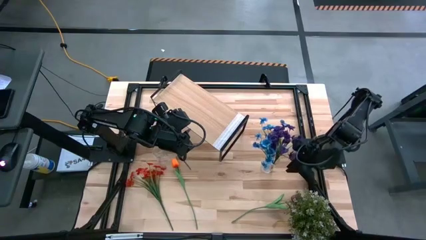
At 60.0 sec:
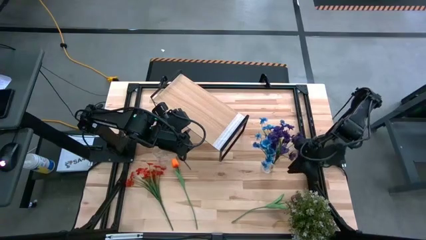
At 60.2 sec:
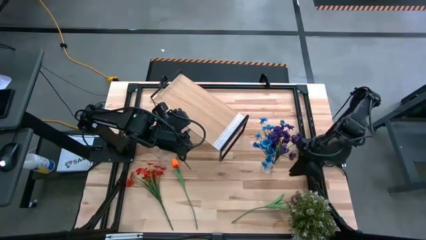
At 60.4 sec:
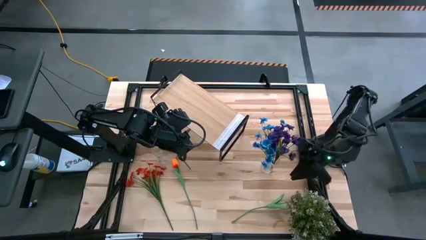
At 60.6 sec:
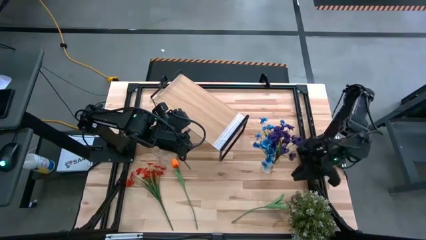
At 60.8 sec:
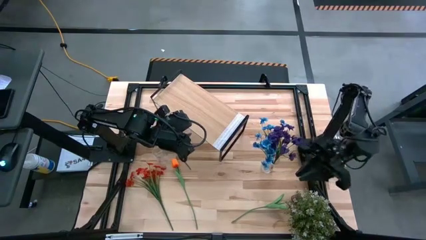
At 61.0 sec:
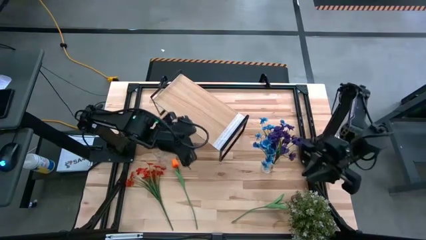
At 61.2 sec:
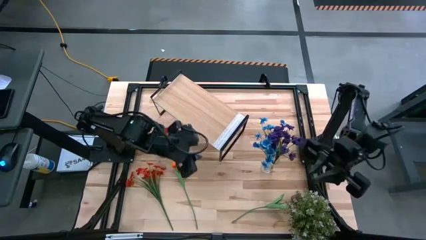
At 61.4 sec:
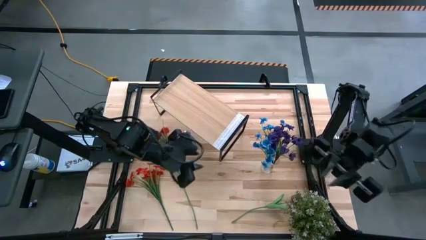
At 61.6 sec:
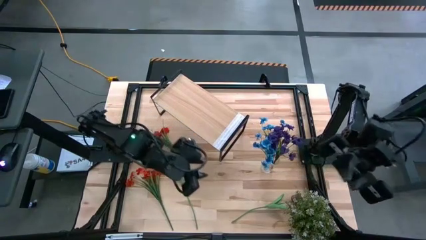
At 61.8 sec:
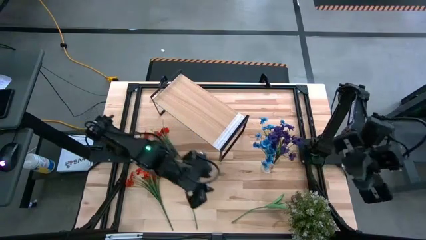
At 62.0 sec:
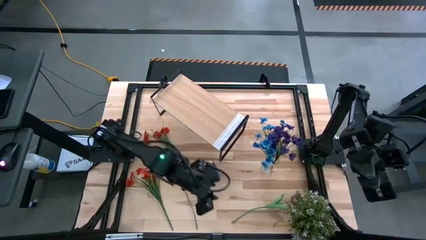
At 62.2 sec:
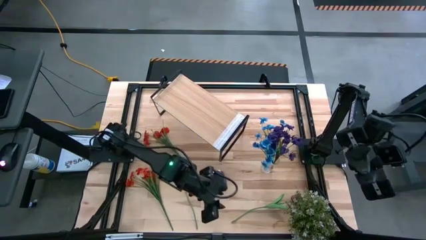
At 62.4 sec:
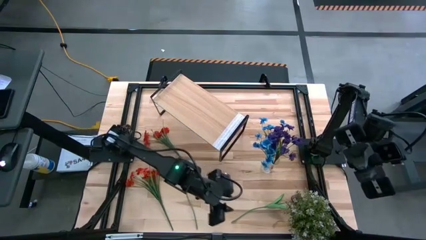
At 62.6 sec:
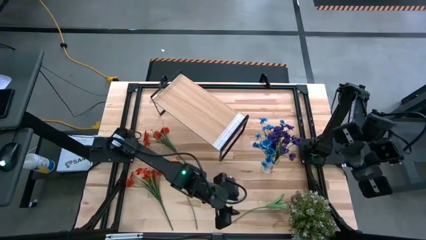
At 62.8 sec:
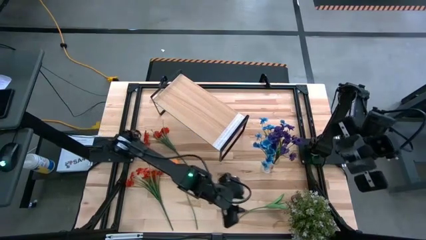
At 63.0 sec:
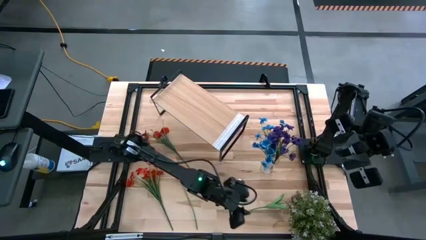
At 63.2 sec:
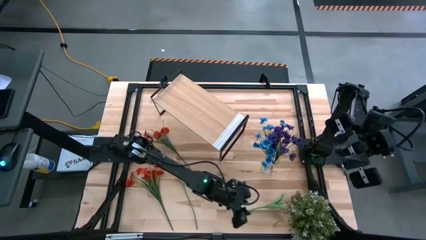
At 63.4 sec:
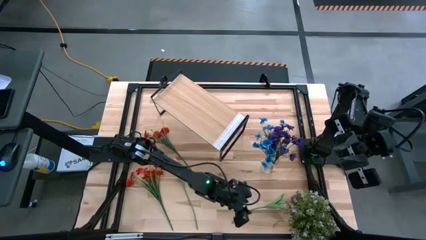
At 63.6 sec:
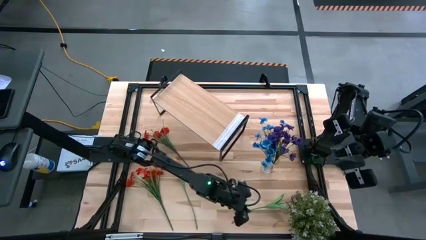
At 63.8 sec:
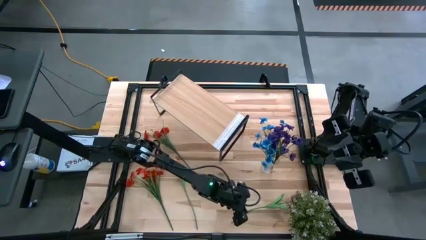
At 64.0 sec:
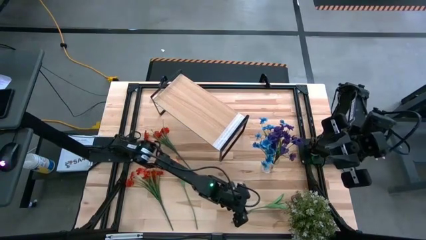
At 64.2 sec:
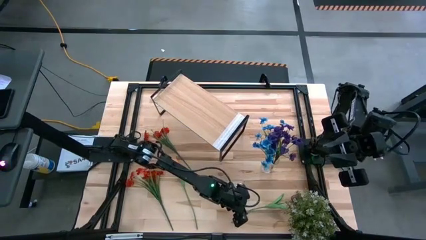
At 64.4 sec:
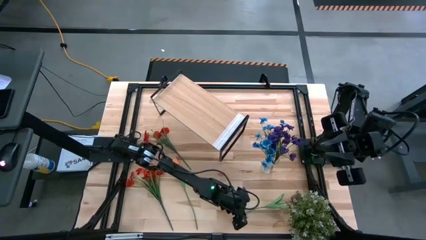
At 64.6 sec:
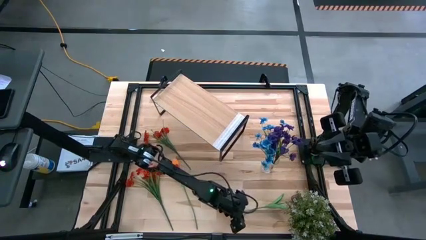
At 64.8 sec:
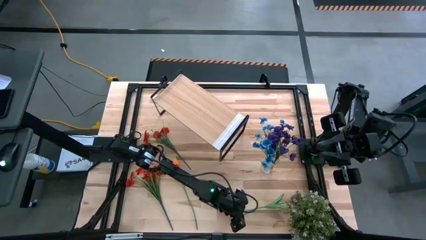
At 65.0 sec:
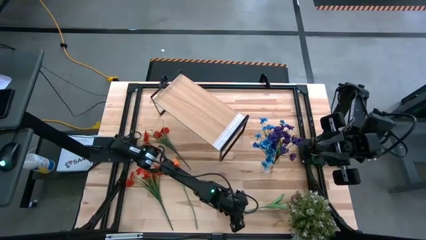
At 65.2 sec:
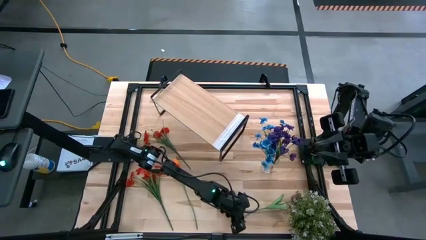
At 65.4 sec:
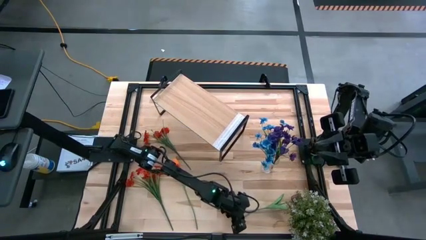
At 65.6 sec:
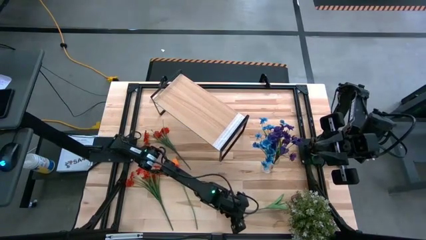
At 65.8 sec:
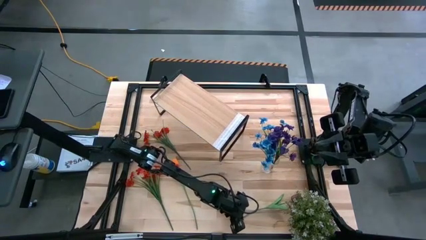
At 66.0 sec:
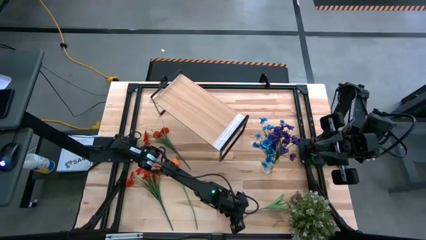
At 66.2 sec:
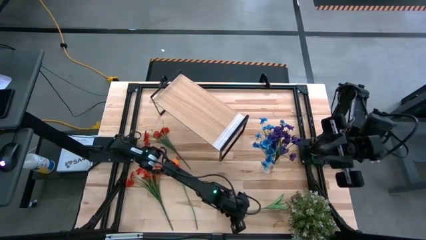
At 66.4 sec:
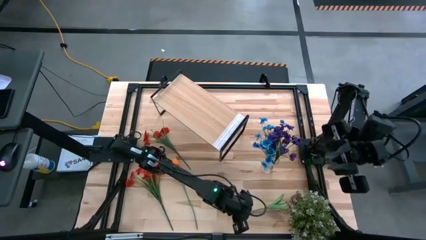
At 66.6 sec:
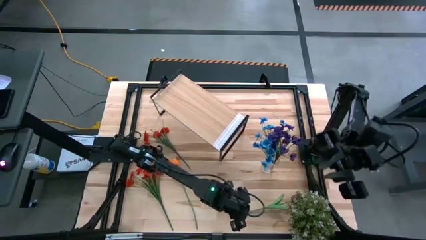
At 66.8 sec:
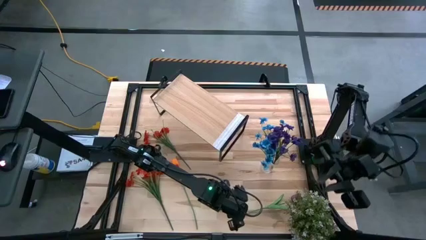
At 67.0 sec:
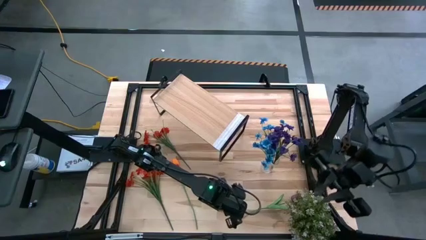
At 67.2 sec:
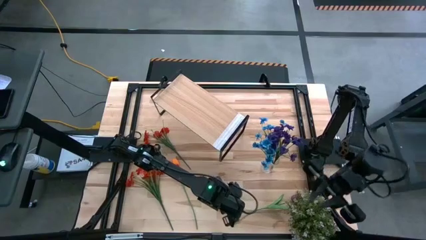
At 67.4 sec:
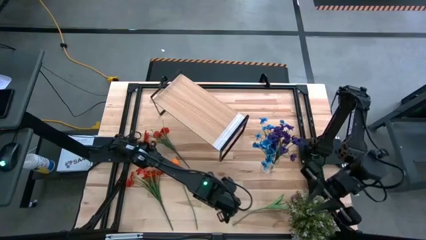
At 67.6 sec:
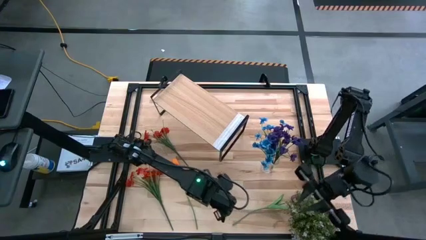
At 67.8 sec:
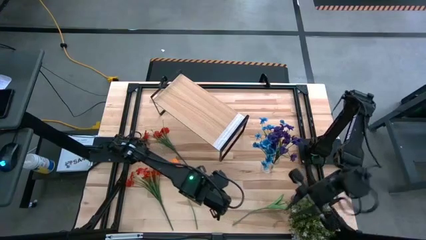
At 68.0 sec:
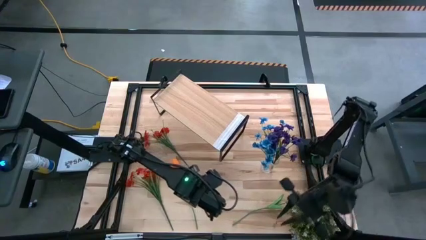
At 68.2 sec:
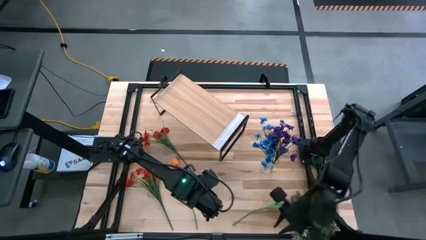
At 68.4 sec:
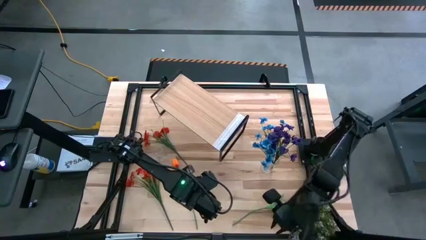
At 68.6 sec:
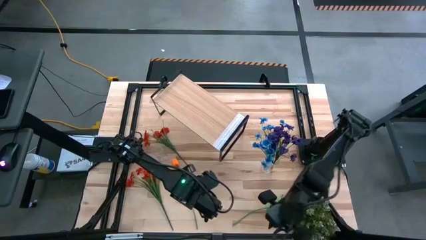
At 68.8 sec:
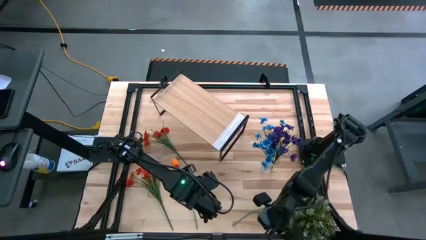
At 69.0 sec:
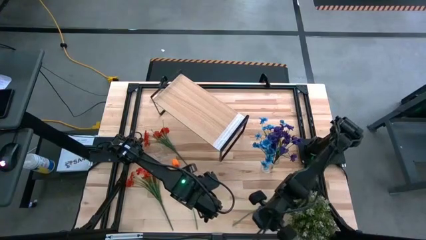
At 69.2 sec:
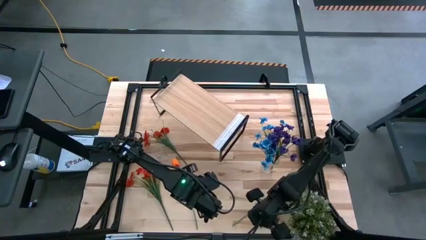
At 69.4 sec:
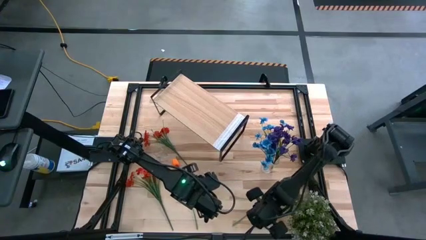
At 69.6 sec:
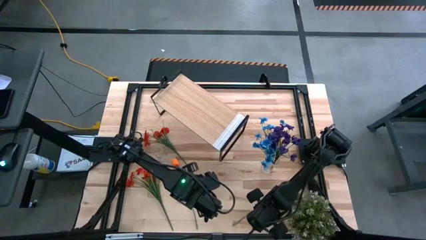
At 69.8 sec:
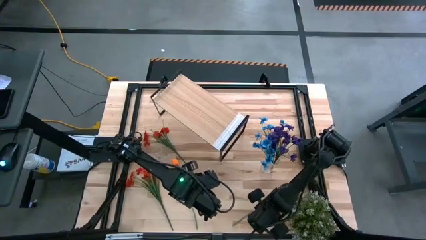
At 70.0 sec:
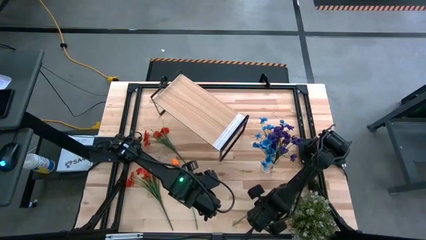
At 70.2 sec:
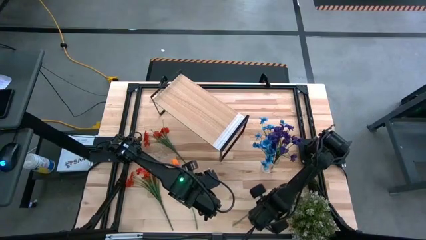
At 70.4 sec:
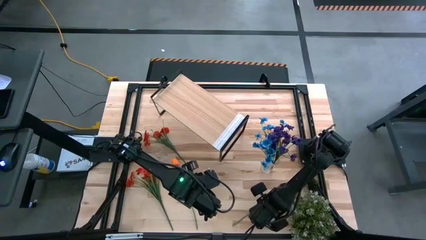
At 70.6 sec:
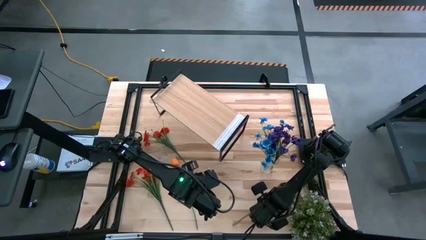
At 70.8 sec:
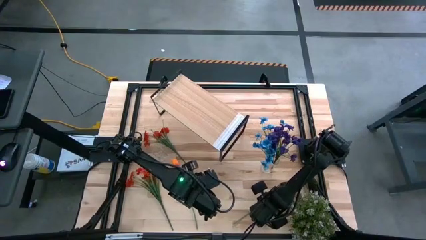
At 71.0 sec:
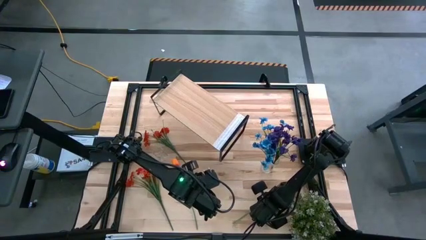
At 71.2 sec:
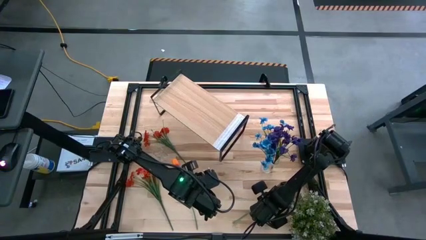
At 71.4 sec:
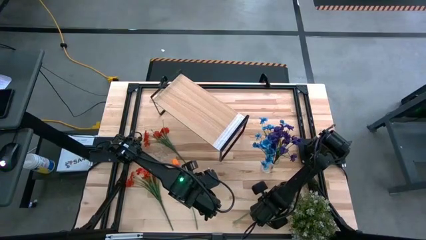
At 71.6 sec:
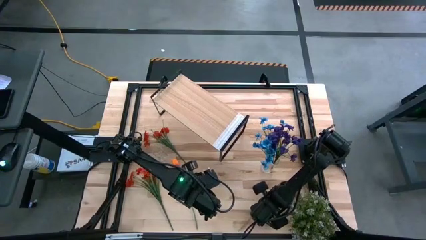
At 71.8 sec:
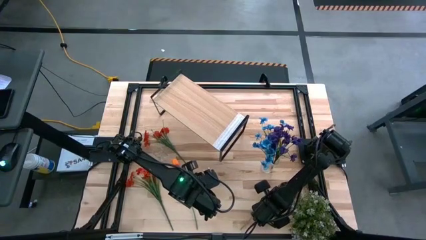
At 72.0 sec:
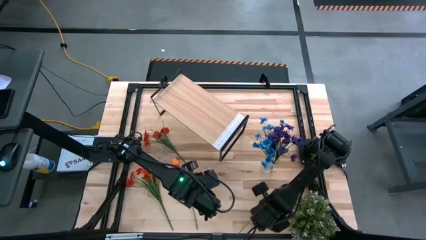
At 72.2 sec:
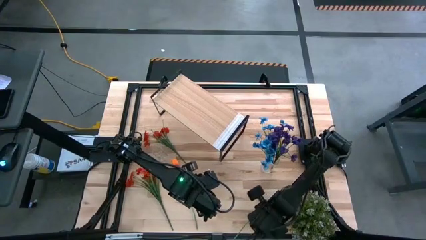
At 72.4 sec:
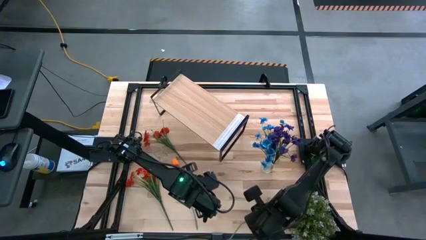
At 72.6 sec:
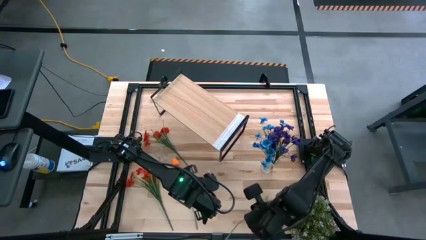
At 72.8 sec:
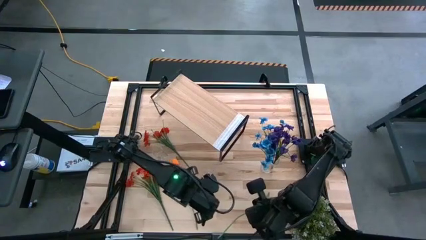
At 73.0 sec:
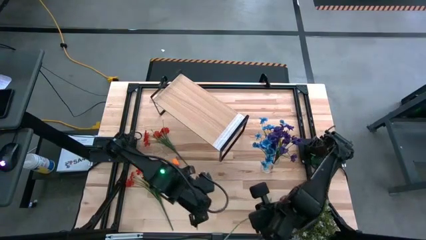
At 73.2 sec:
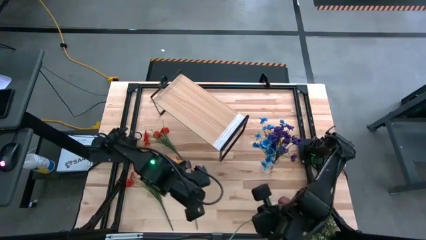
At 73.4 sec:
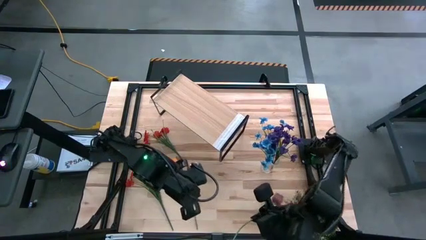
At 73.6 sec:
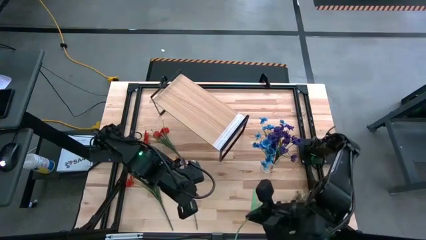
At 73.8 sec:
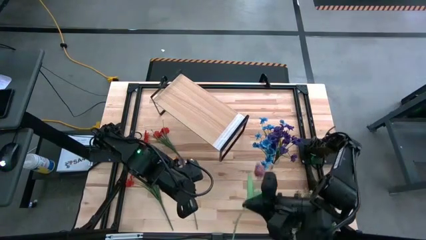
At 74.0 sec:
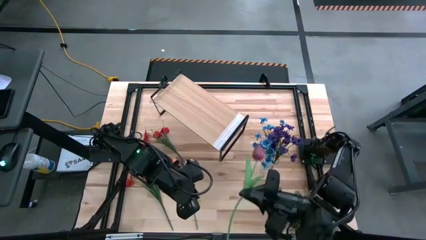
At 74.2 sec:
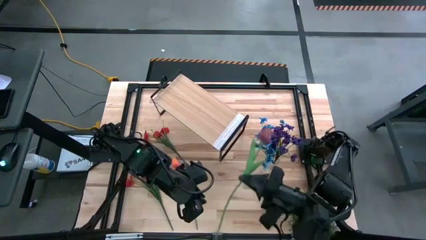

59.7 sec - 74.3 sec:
Task: Pick and place flowers into a vace then onto a shelf
Put the dark red tulip into the right transparent vase

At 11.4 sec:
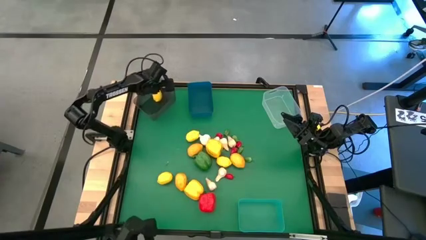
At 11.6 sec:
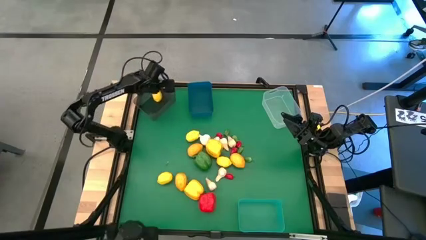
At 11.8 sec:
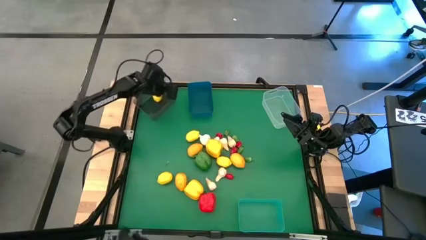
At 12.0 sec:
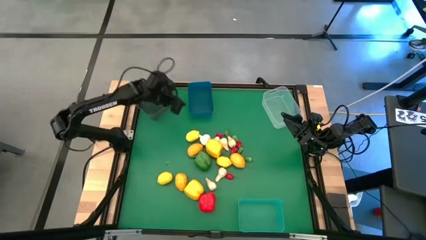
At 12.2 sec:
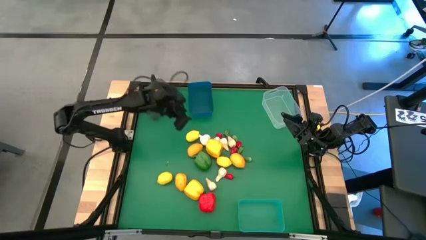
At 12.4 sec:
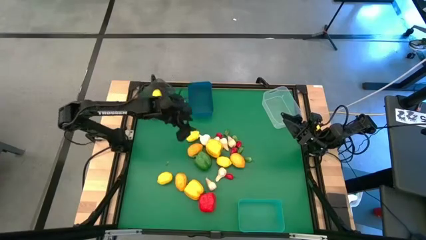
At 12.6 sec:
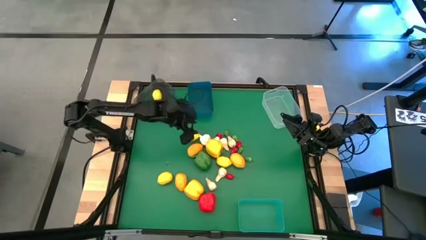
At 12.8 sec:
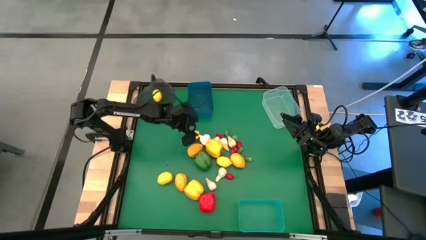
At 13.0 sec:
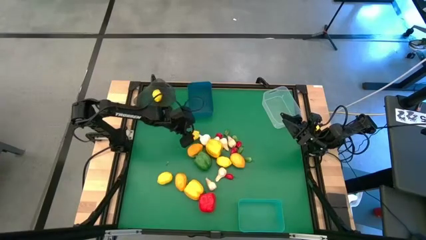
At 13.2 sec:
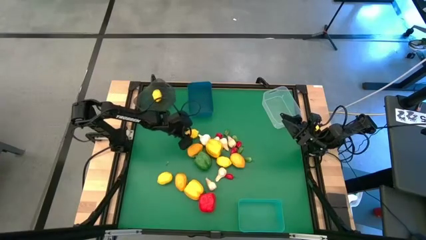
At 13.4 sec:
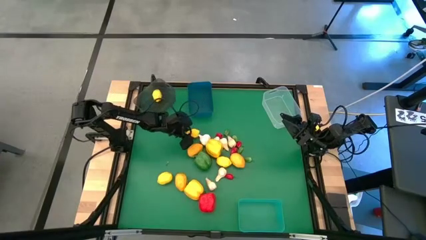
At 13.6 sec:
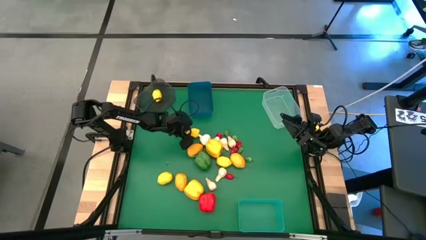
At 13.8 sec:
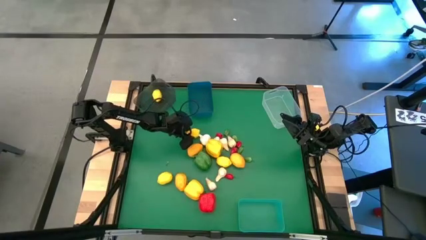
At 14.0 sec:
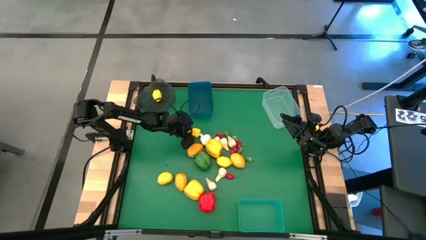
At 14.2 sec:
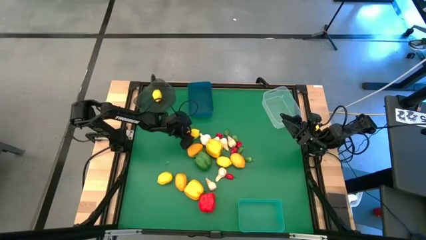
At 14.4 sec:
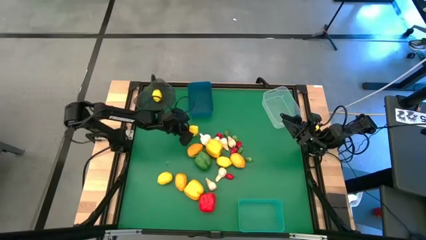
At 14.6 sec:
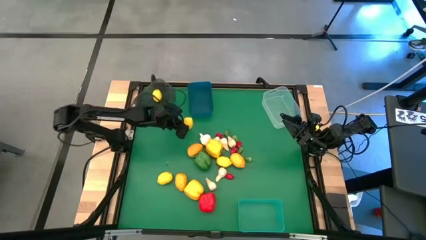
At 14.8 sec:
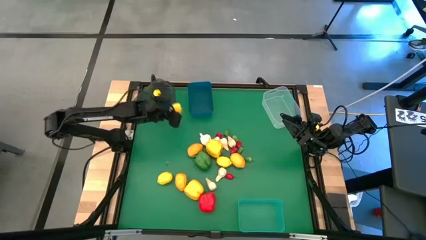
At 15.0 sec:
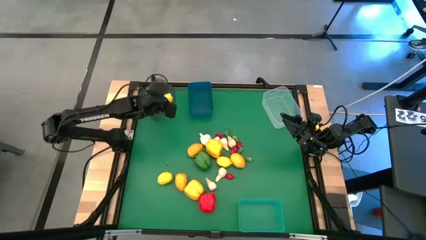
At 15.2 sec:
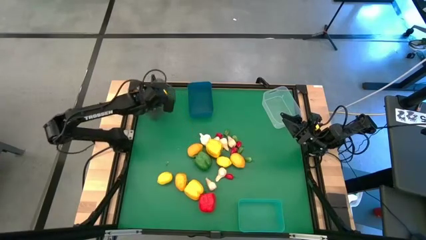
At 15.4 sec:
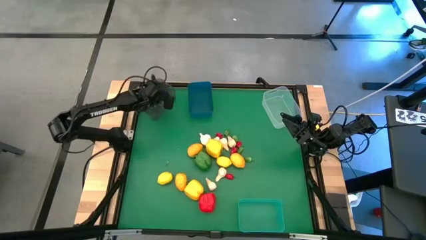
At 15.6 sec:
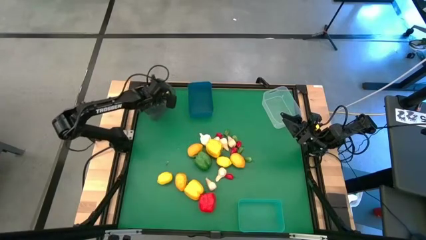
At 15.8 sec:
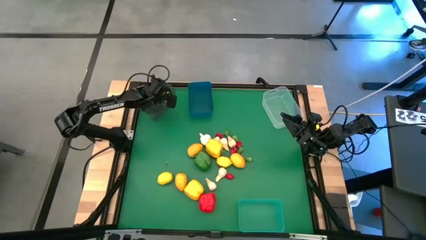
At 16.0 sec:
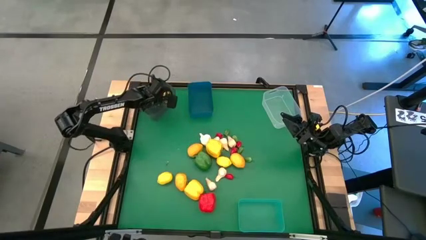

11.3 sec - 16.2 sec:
Task: Sort produce into baskets
Put the top yellow lemon into the black bin
